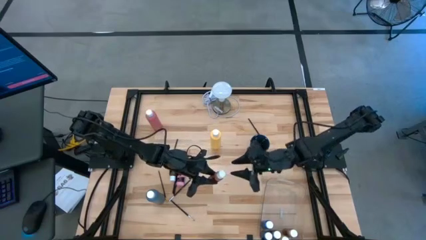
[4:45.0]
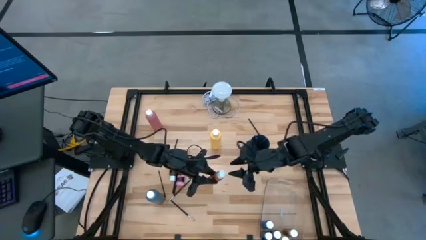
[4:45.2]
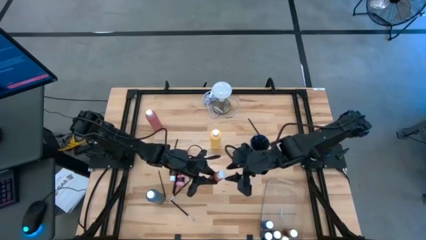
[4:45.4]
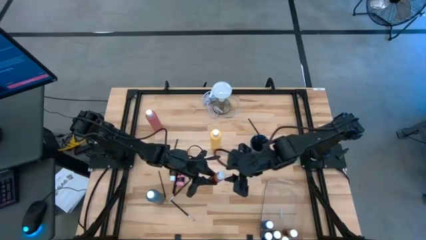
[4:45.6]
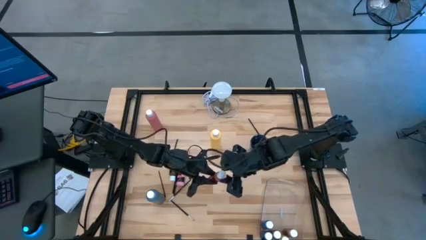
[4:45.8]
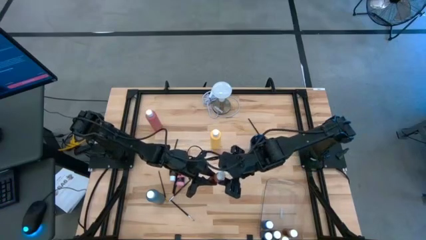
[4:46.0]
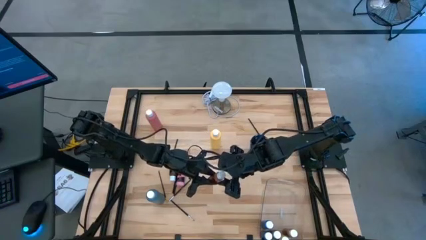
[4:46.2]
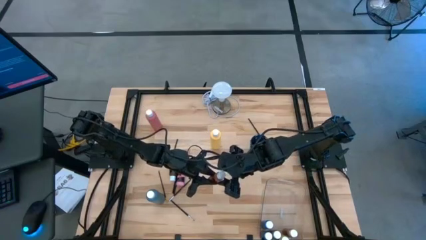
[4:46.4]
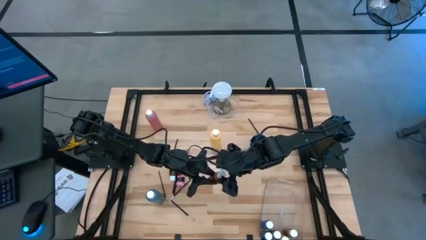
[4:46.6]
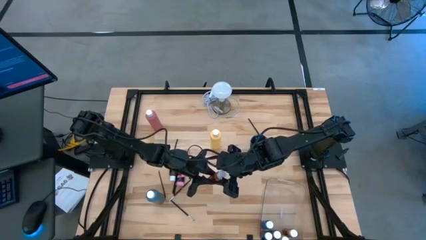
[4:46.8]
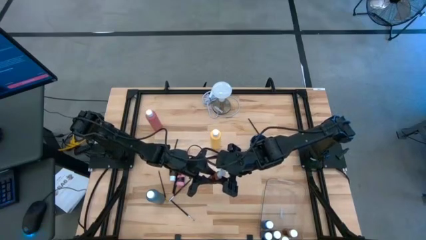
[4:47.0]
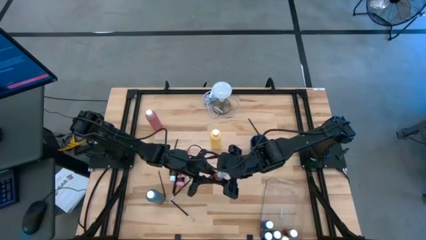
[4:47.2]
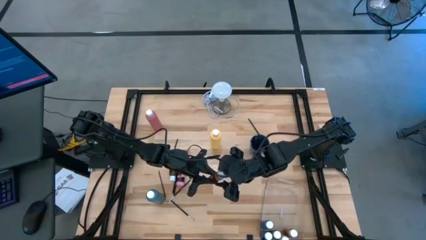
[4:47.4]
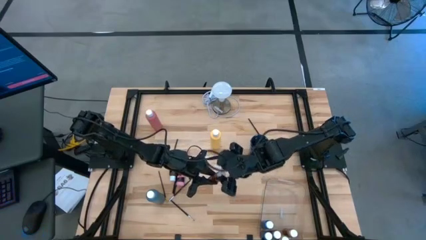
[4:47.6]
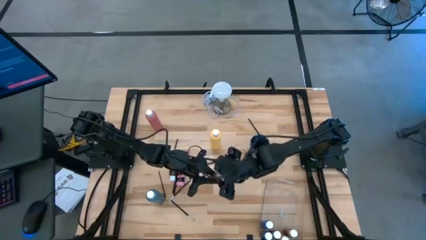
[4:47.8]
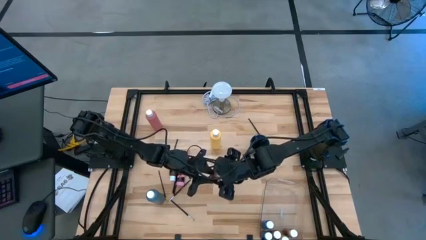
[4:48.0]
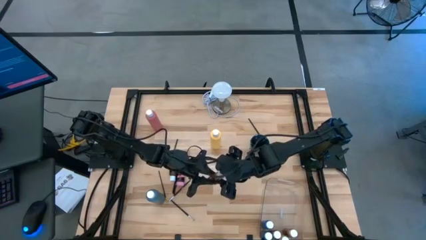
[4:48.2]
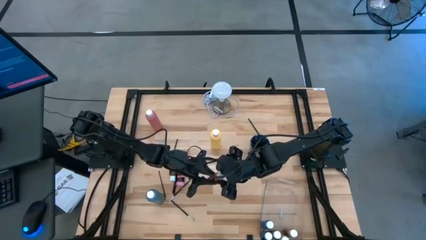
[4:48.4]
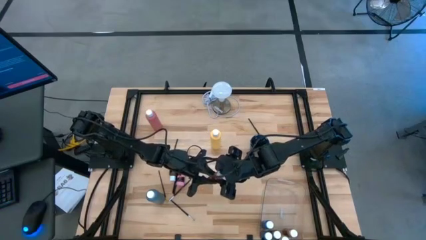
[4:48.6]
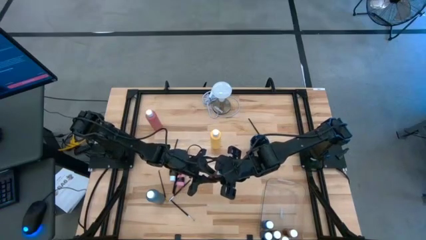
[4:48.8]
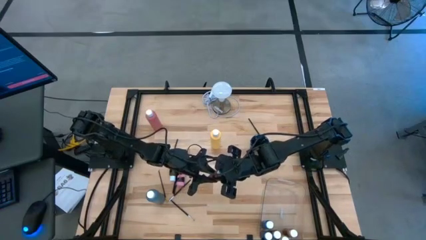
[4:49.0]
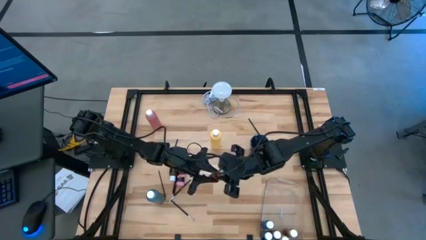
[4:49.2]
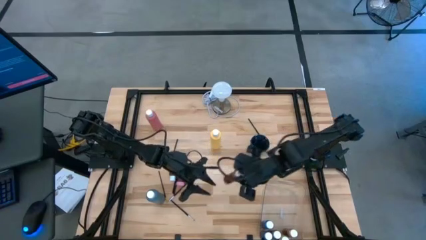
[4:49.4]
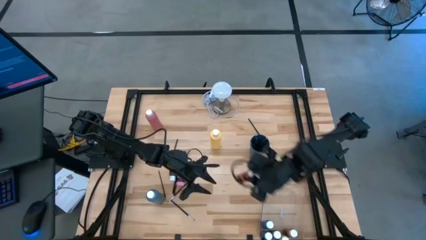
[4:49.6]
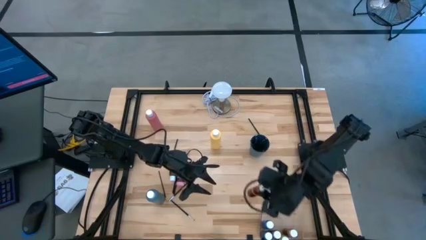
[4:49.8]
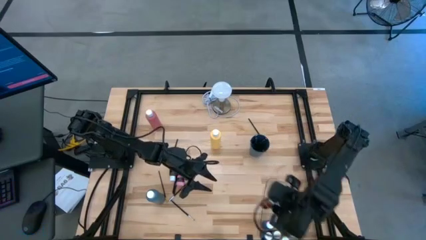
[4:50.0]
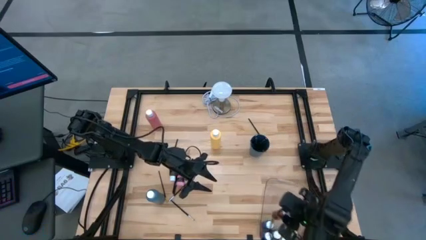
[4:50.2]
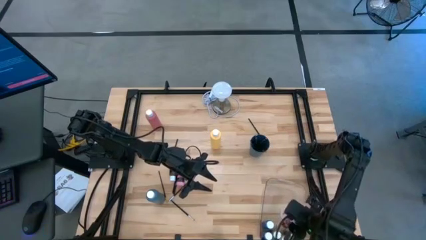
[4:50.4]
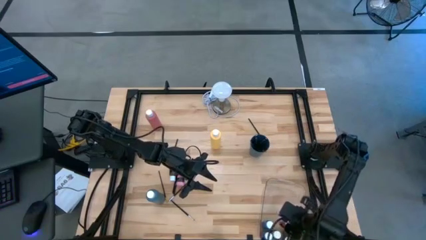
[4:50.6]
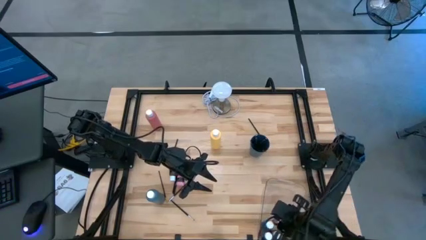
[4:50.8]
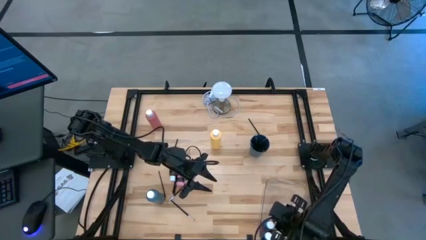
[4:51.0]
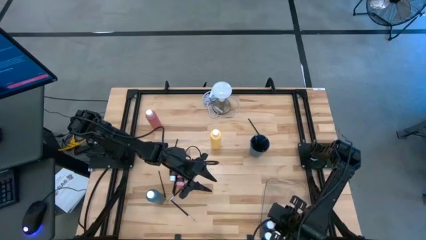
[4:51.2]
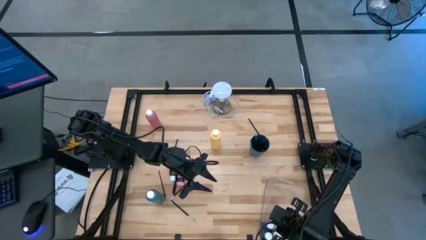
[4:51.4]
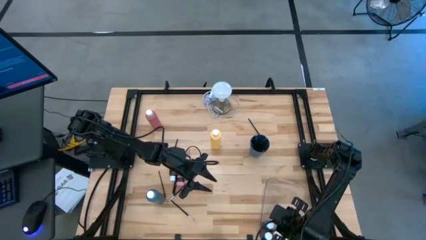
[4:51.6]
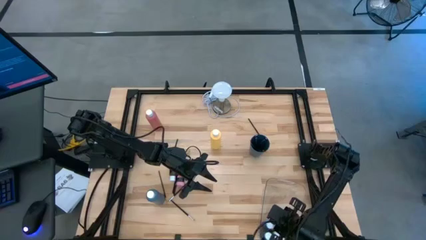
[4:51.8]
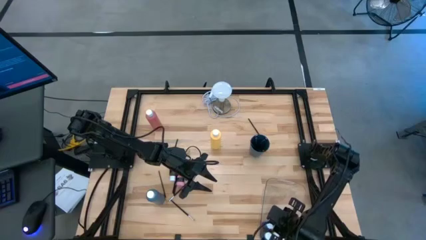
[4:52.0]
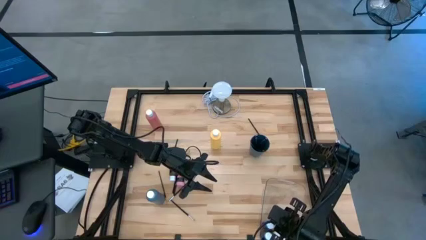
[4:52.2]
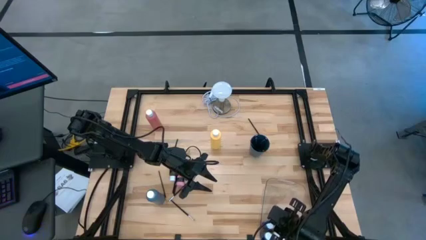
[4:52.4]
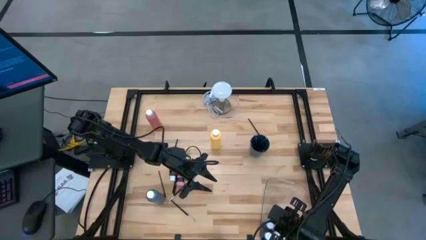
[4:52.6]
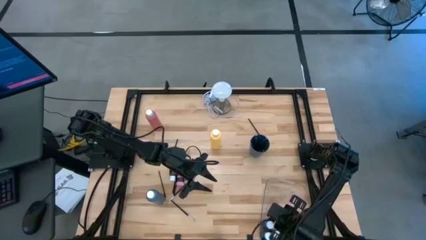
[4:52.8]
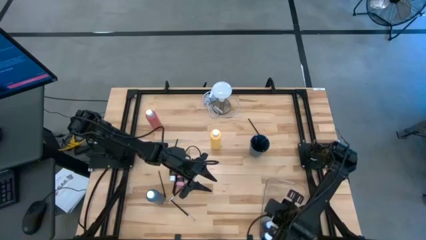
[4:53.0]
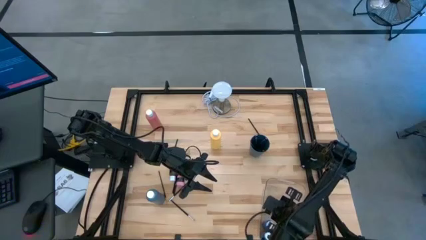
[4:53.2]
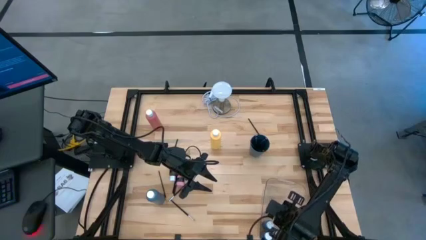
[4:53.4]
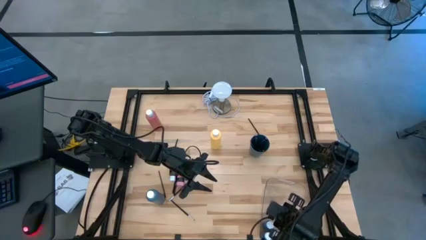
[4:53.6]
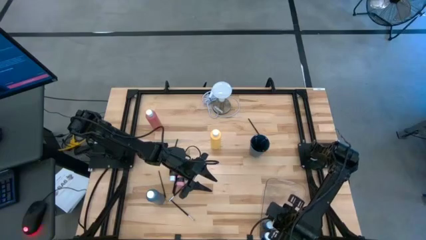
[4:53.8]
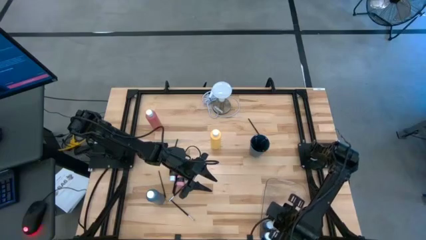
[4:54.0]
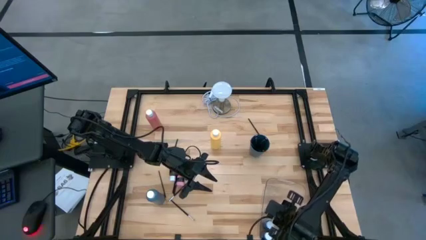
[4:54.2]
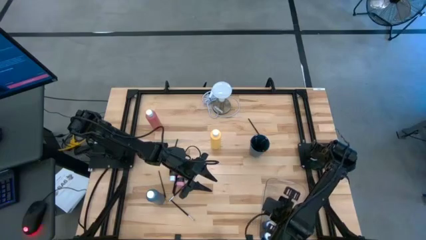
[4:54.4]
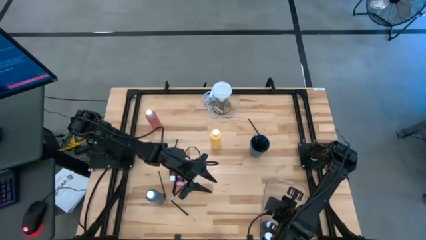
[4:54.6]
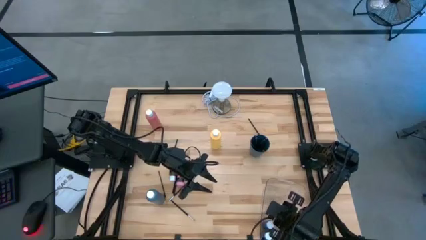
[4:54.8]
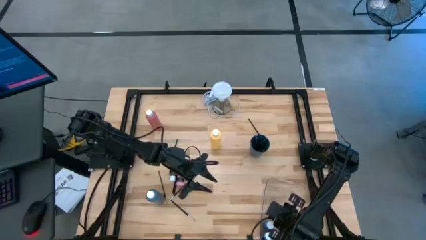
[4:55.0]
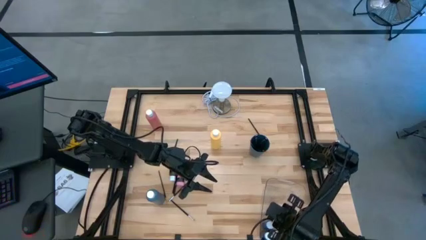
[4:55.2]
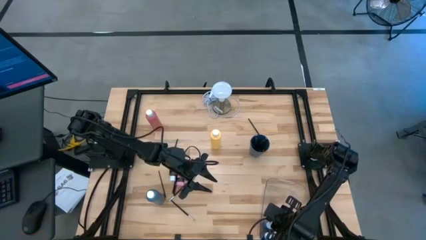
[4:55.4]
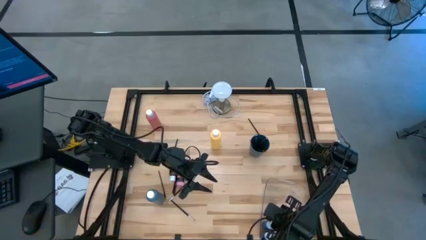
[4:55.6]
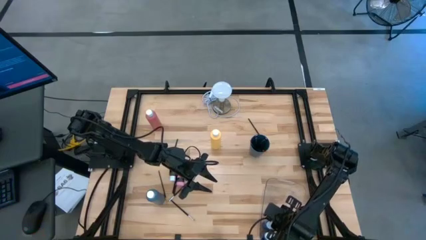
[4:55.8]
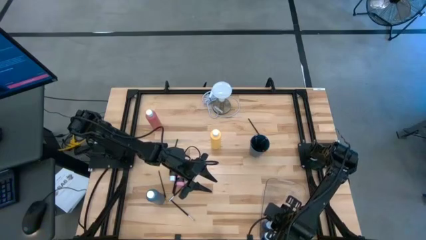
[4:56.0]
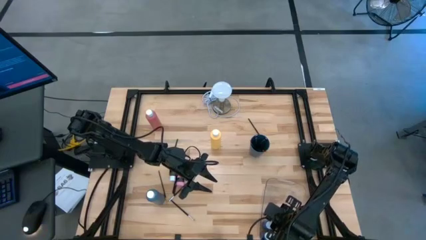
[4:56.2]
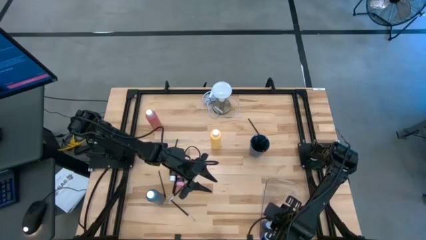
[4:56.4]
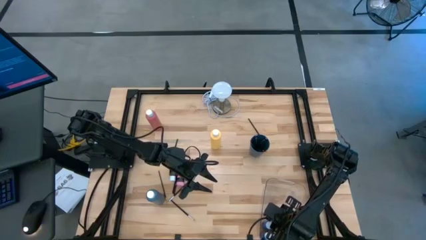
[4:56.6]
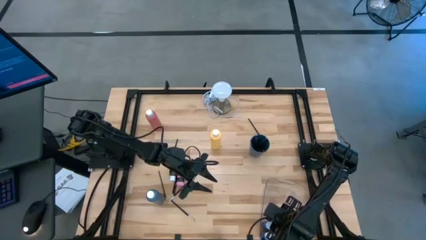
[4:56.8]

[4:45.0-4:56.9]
Task: Pick & Place Paint Supplies
Put the top small brown bottle into the transparent bin

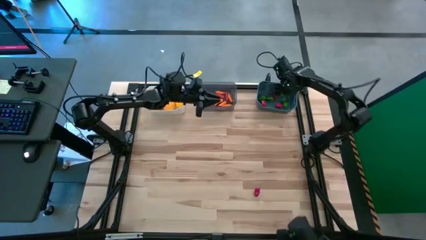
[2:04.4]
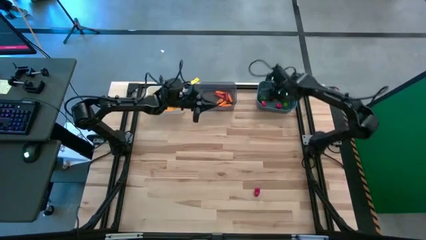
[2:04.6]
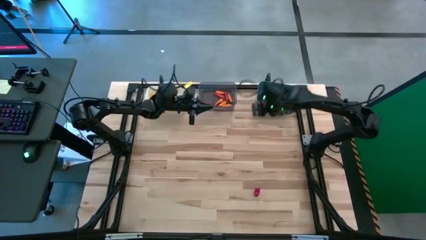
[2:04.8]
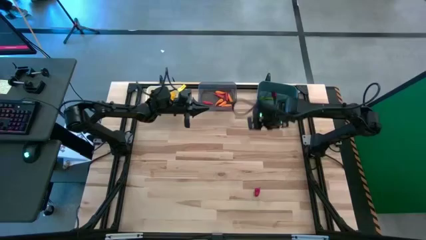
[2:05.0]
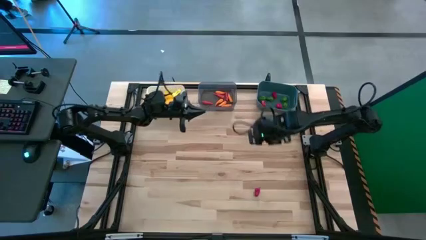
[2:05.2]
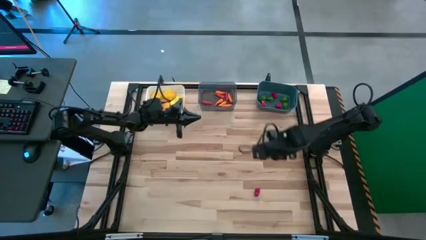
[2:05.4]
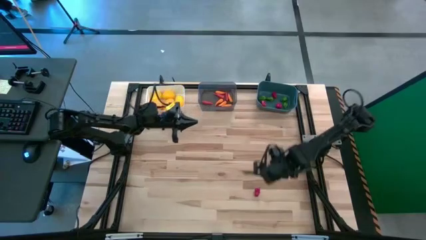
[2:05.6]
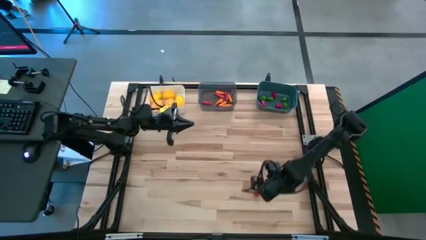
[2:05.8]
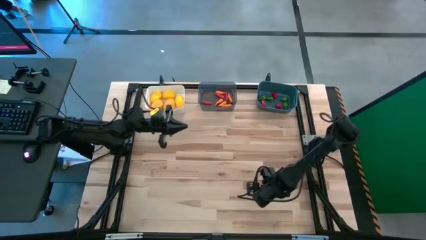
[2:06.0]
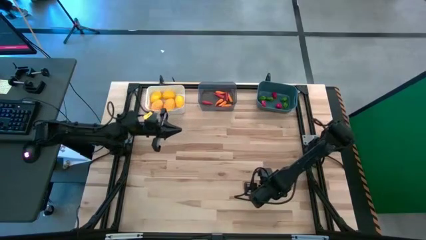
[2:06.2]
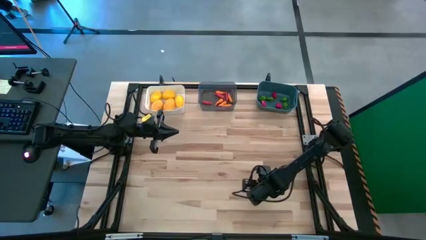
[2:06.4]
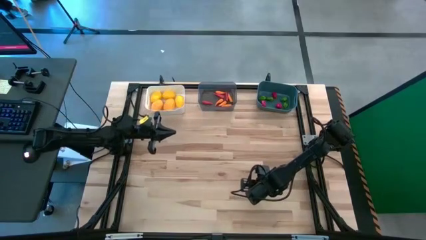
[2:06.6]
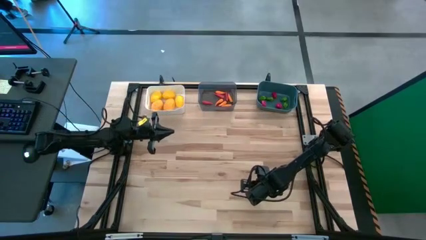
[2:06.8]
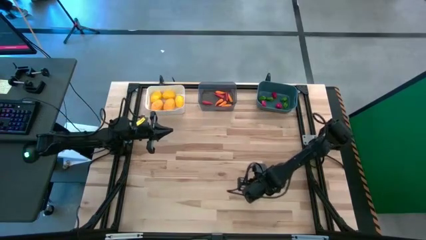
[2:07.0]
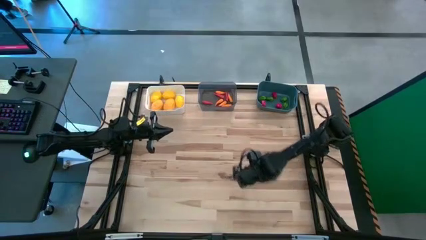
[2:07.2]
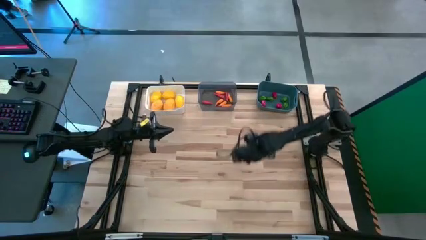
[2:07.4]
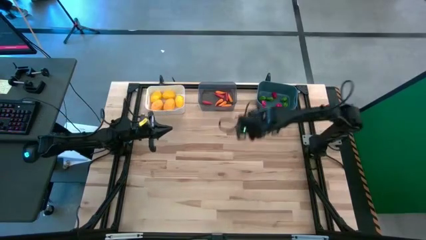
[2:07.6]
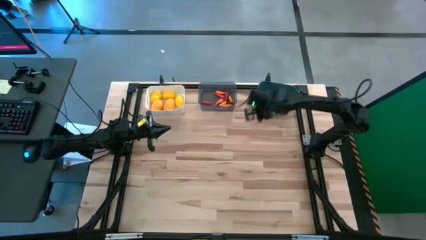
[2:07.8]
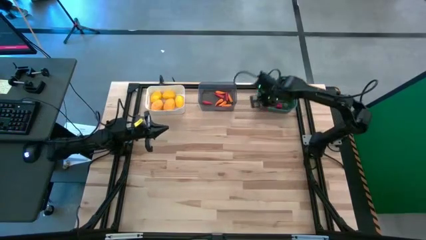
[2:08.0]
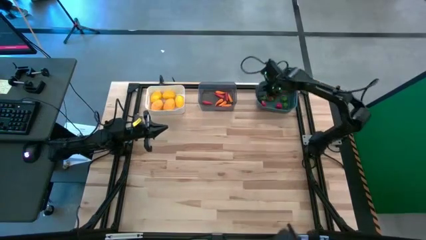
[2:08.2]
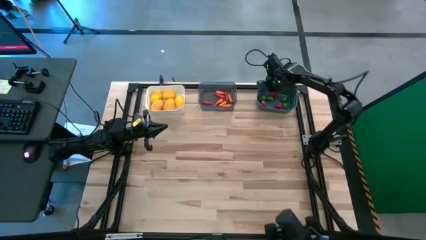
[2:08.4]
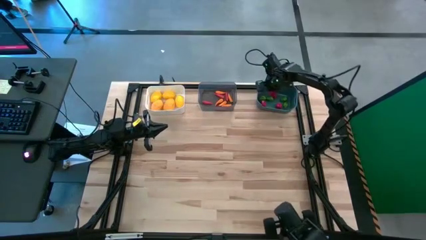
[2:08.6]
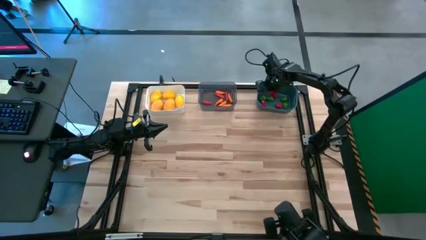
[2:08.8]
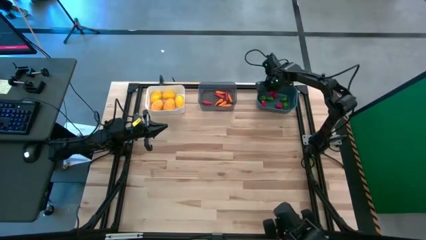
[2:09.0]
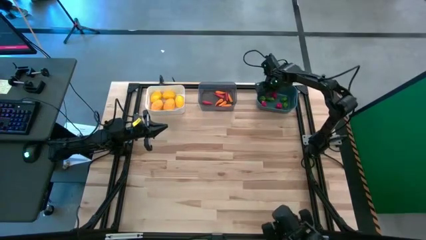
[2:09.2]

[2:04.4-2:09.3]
Task: Sort produce into baskets
Put the red bell pepper into the blue bin
